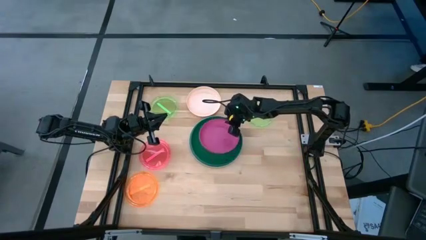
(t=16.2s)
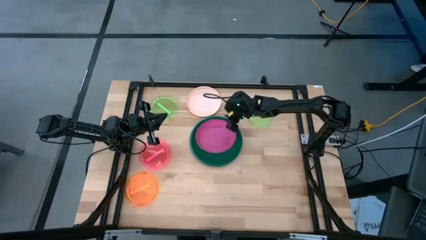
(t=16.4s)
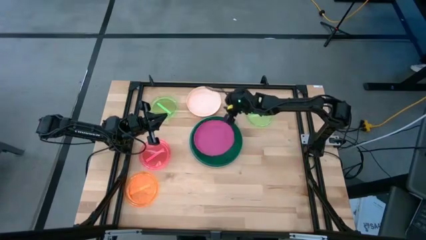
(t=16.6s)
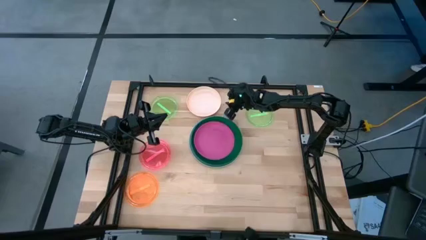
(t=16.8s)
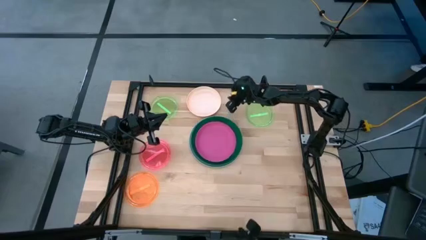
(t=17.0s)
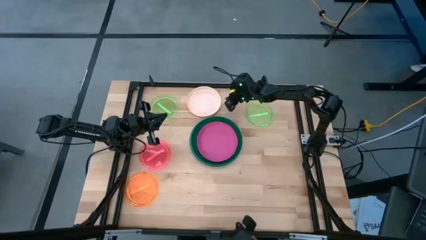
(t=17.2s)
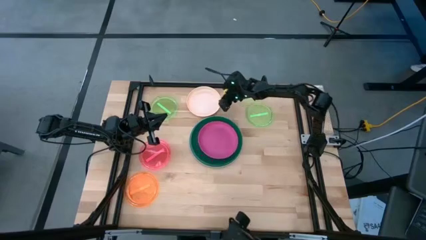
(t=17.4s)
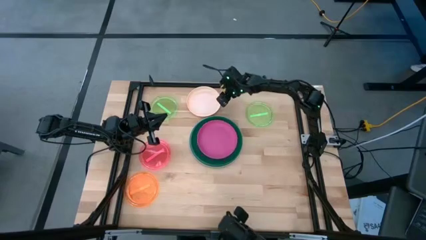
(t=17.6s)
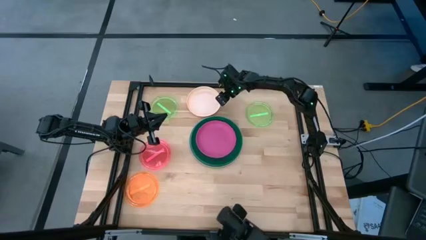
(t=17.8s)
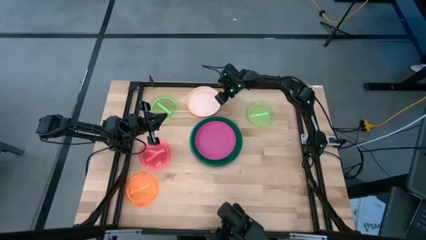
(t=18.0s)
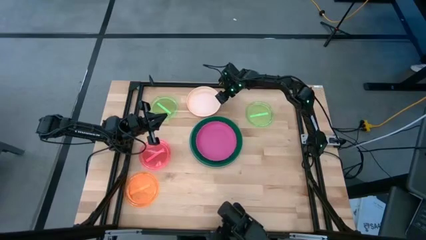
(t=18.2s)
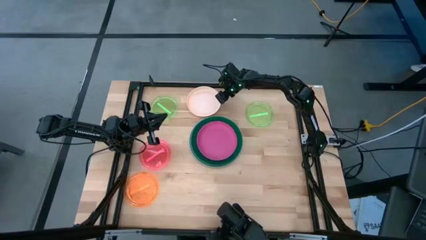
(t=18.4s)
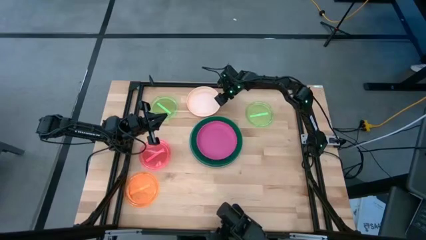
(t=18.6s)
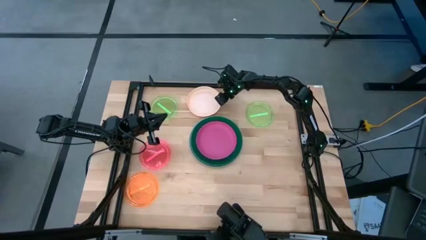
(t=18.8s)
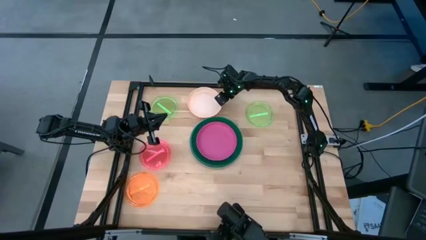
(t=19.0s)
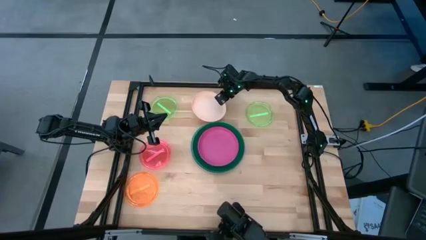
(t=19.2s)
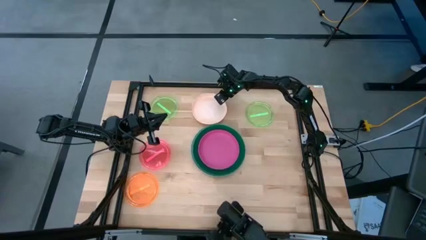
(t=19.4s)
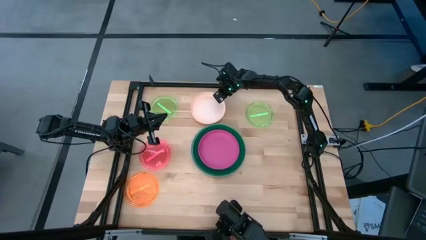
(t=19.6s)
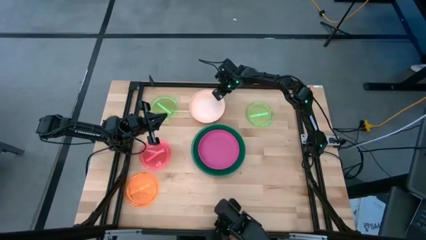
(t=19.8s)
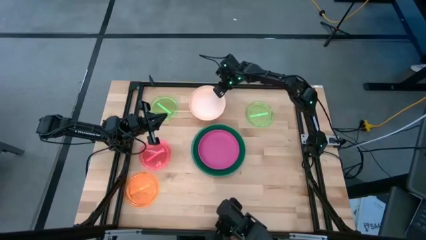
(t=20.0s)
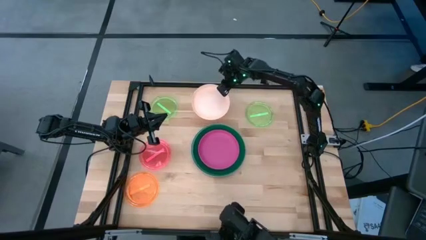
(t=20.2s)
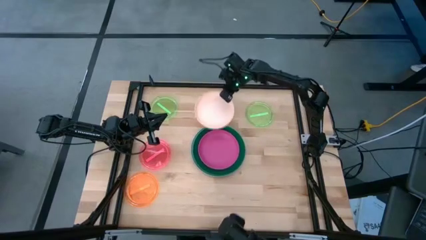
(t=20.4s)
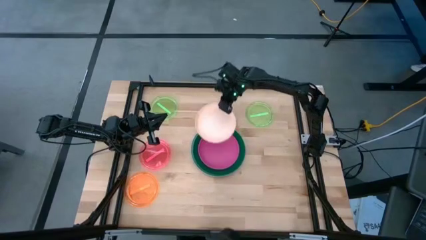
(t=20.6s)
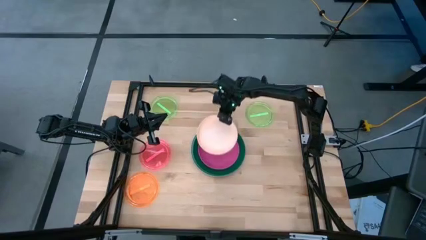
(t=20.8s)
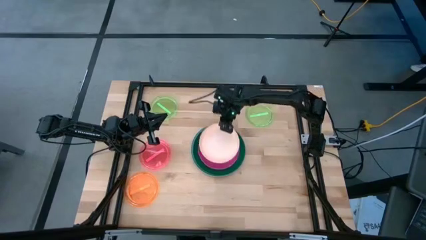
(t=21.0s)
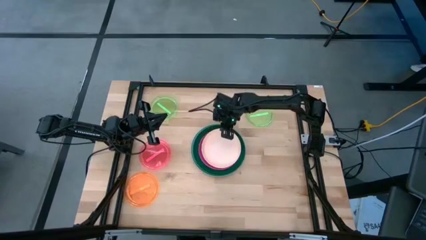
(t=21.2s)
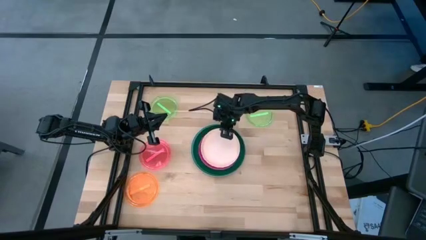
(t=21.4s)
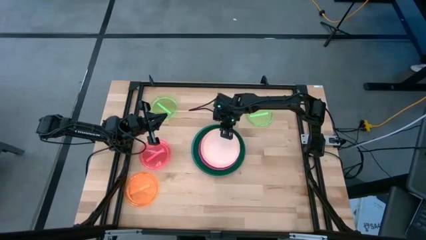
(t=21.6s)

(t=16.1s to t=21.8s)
Task: Stack plastic plates
Stack the light orange plate on the pink plate

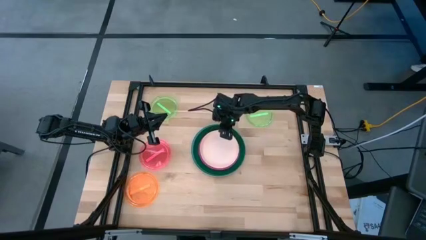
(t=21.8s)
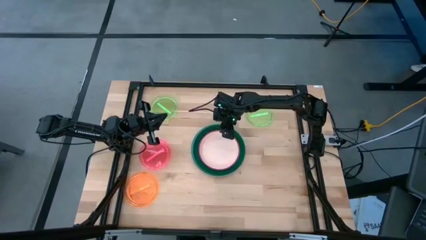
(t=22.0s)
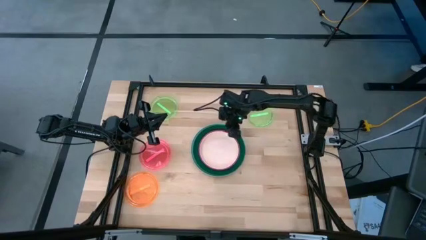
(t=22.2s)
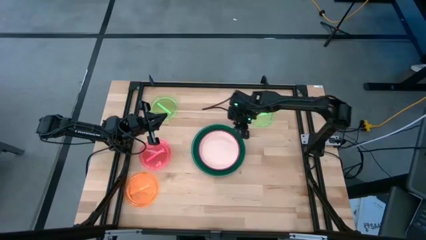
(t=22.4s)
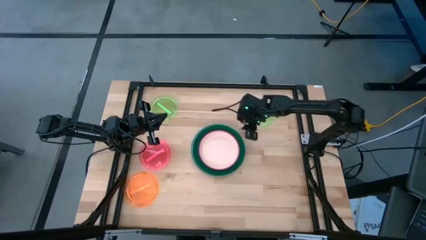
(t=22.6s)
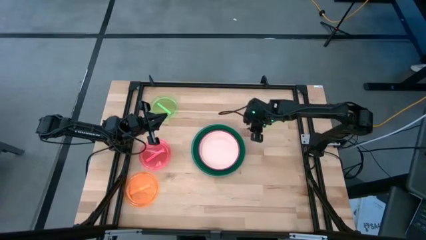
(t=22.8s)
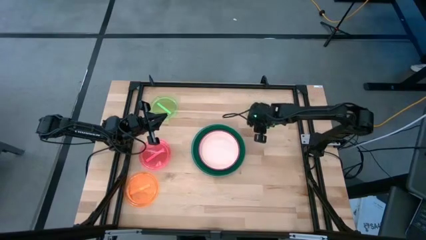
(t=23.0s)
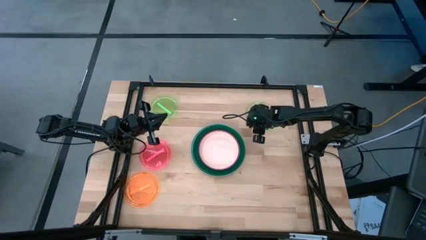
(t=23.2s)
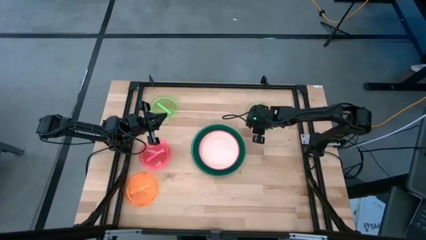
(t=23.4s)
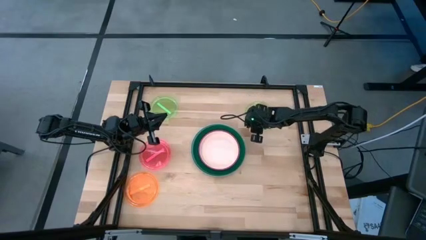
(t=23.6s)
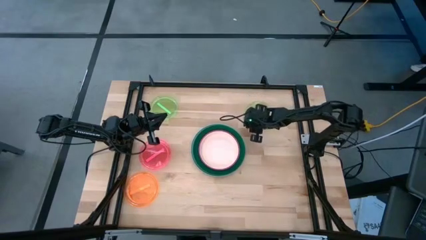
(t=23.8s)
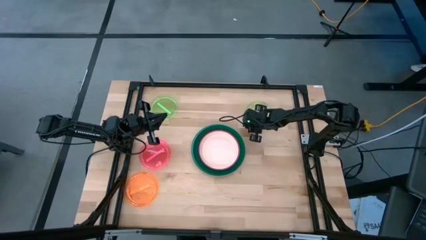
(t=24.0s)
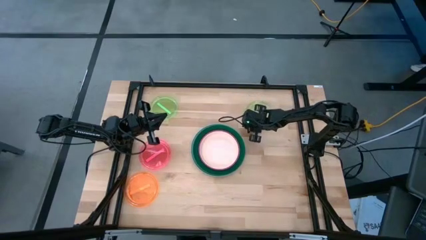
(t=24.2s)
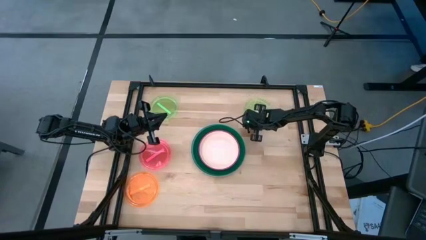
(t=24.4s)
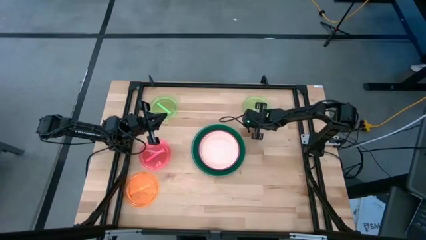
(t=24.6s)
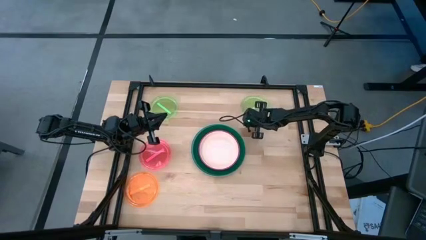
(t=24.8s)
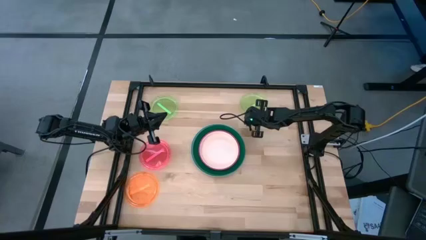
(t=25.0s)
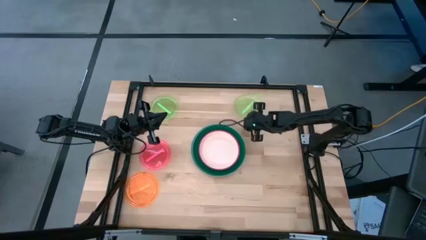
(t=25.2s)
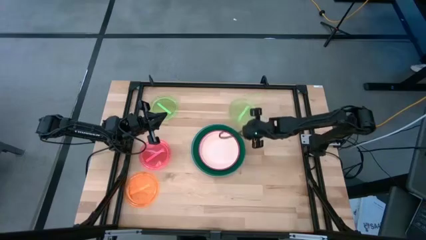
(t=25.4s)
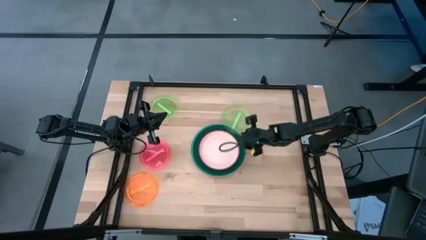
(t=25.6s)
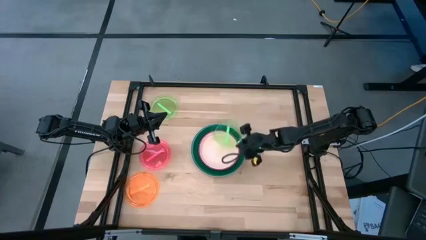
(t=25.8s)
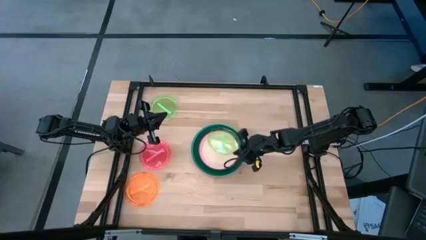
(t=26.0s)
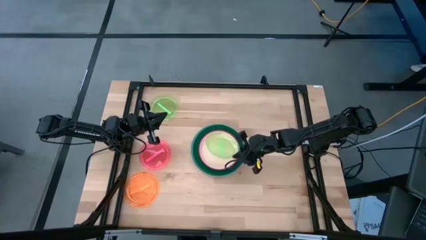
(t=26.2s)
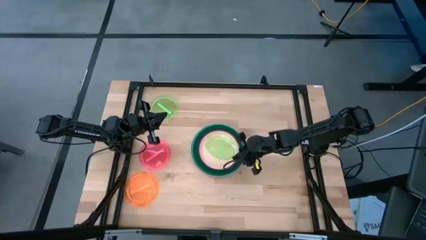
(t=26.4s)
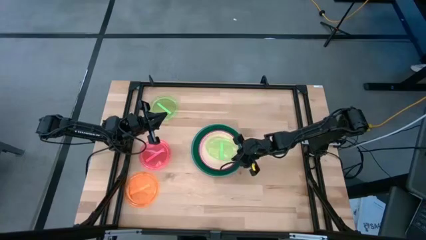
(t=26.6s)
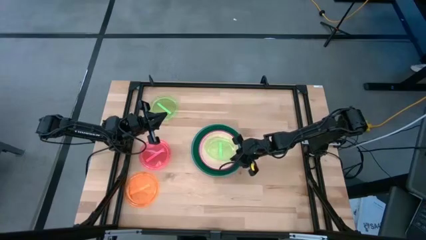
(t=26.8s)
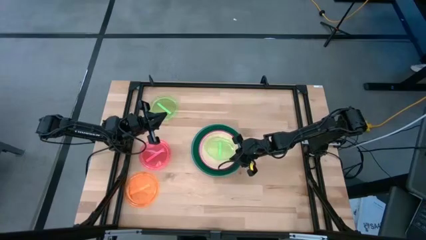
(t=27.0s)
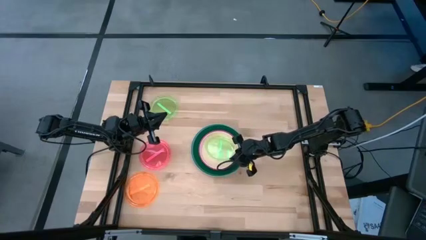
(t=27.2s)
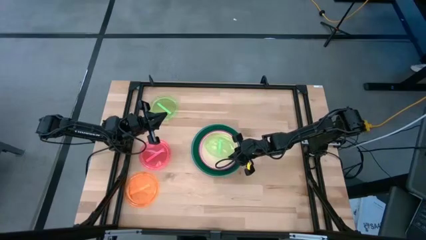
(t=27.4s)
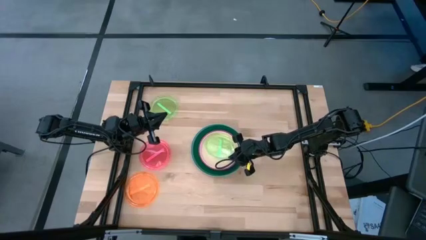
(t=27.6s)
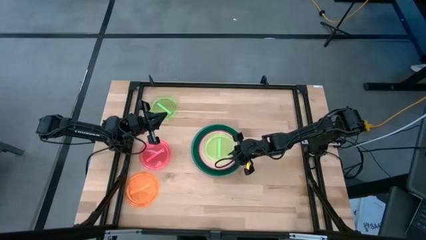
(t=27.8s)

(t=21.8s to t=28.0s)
Stack the right green plate on the light orange plate

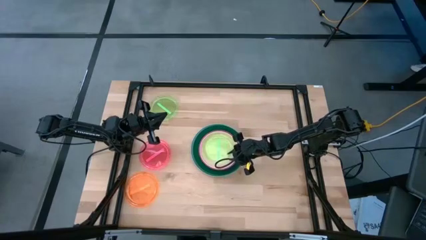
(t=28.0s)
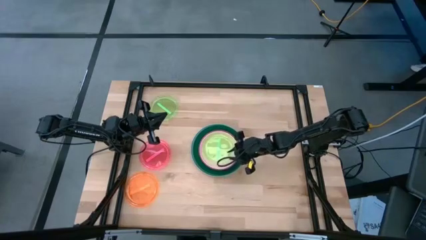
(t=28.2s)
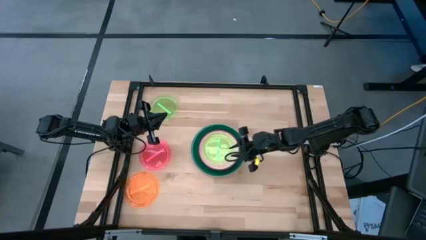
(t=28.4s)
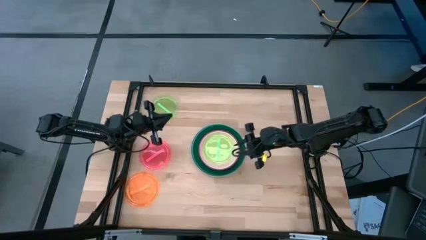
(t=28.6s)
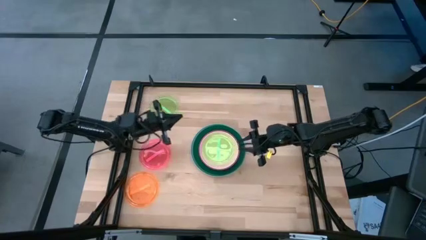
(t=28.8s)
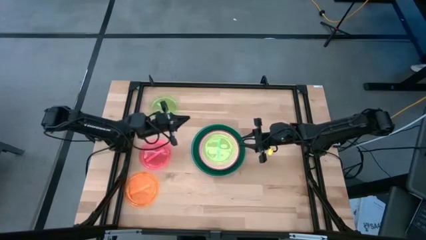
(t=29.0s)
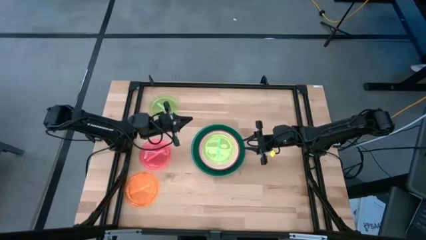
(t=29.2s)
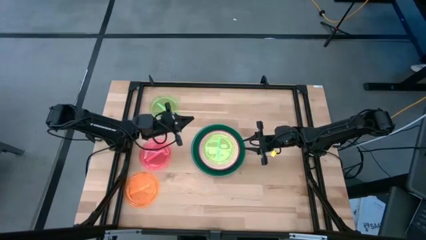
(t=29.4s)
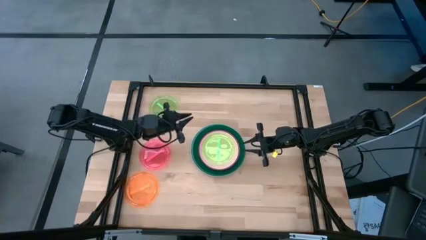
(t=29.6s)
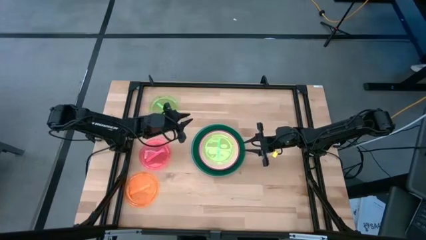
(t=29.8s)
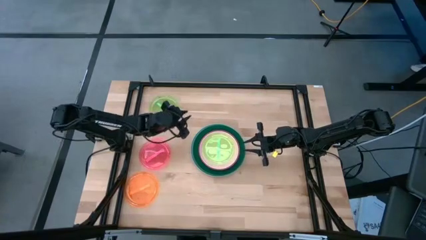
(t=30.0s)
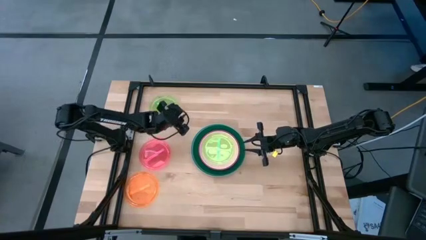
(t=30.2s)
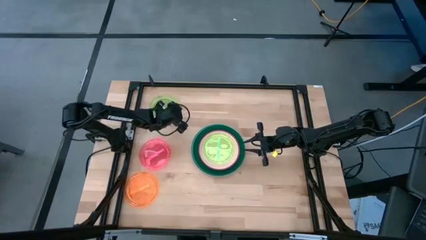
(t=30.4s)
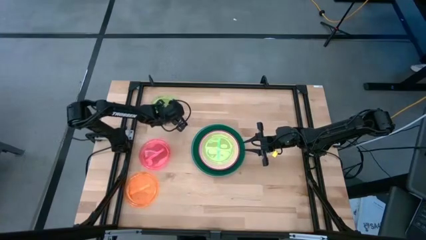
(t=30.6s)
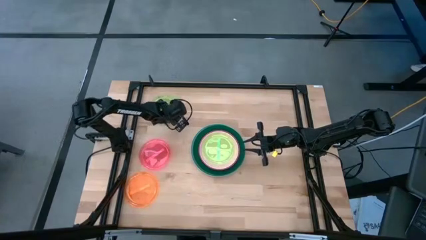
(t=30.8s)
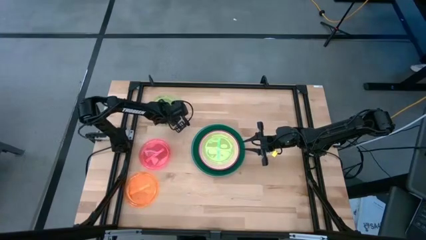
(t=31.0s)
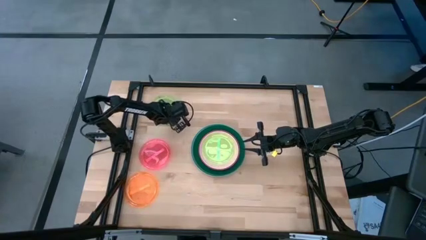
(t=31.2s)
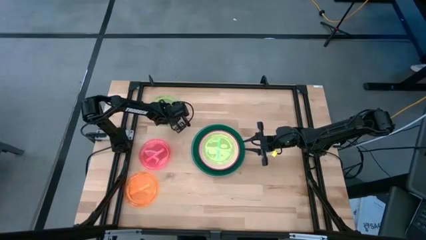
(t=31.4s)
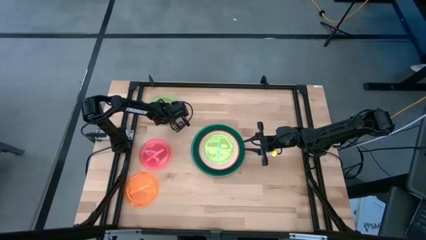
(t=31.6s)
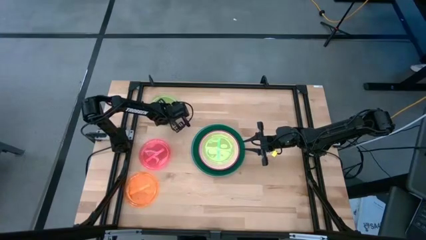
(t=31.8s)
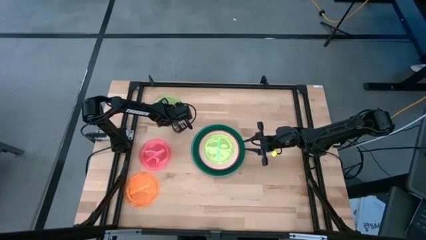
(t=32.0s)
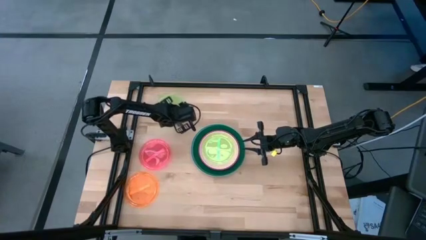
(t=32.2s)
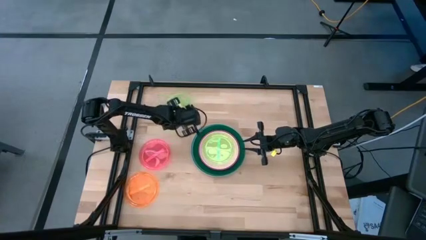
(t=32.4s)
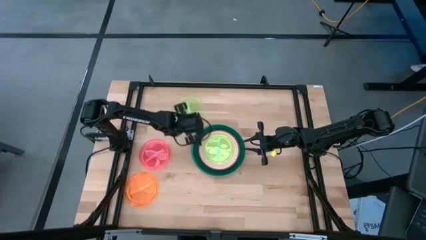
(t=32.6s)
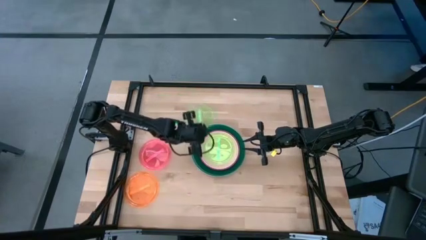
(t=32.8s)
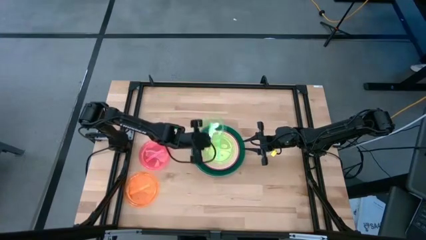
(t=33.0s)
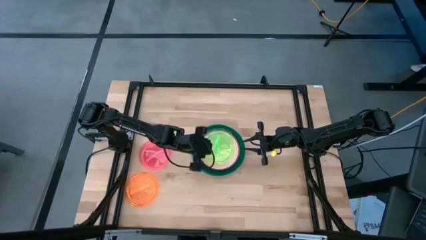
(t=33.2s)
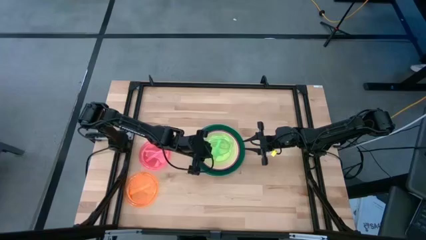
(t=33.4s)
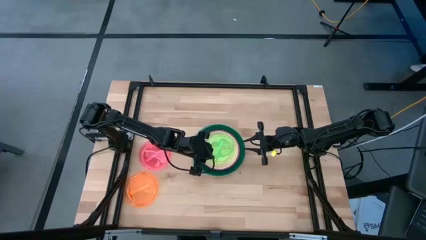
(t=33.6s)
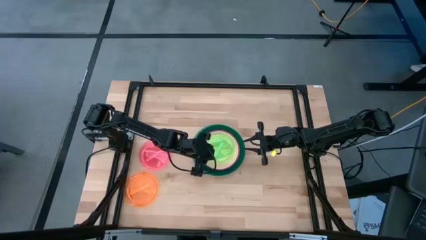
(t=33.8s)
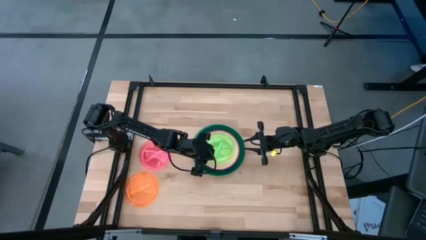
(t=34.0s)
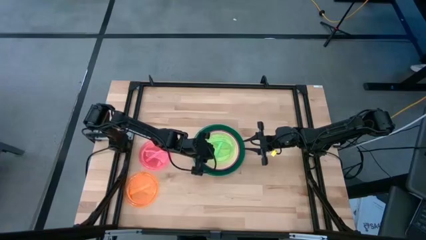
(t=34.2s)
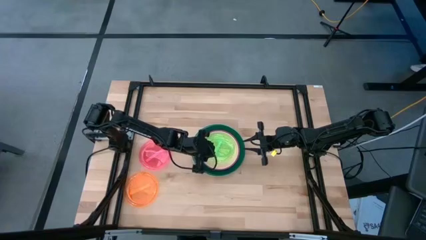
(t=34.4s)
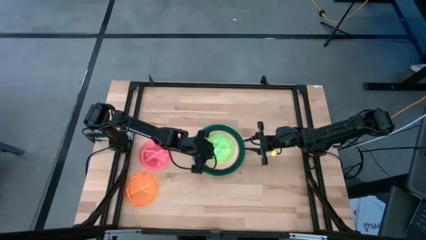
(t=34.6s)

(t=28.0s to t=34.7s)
Stack the green plate on the other green plate
